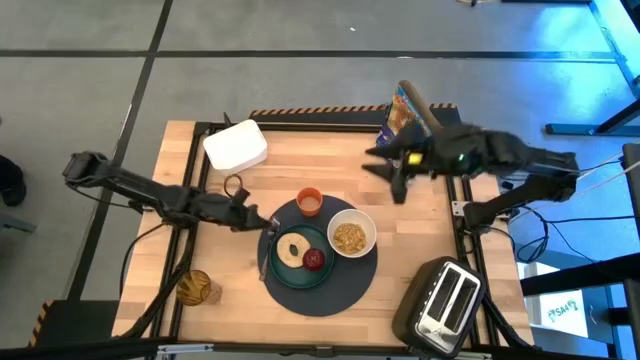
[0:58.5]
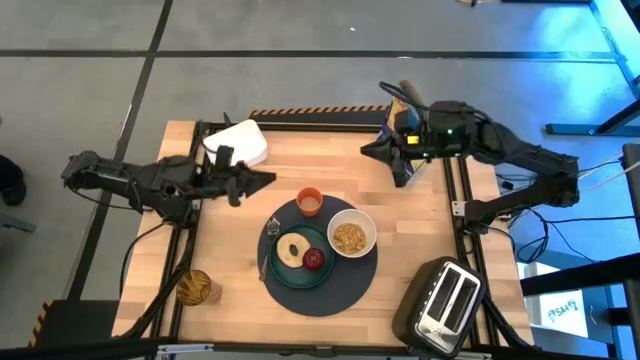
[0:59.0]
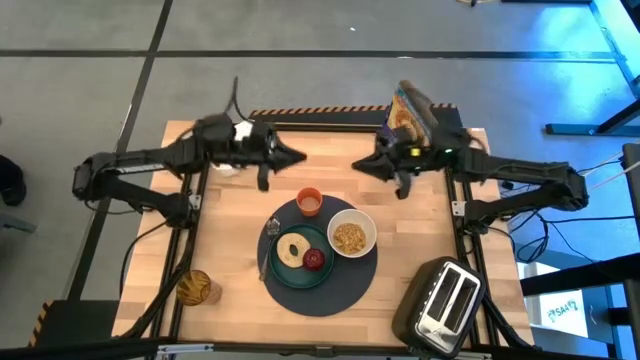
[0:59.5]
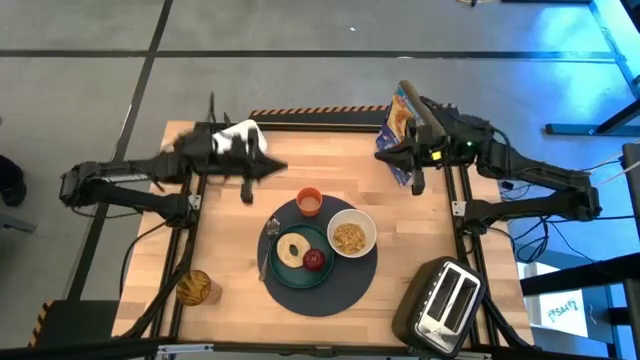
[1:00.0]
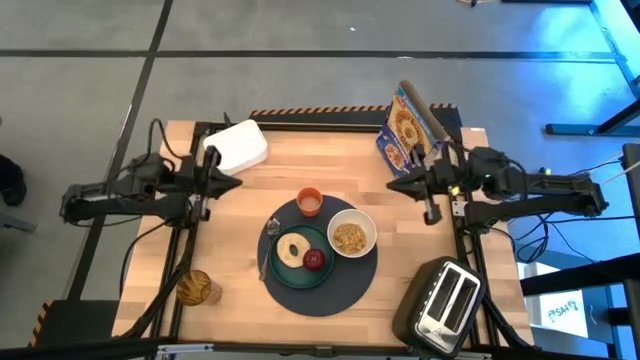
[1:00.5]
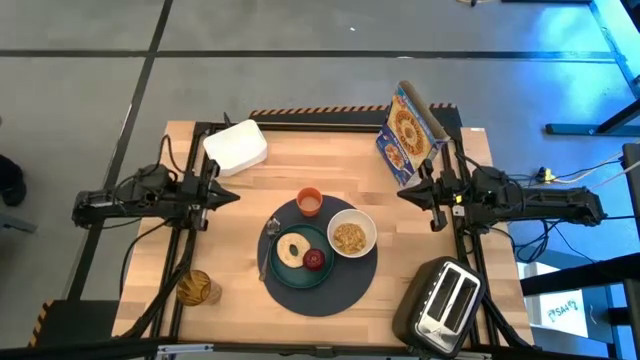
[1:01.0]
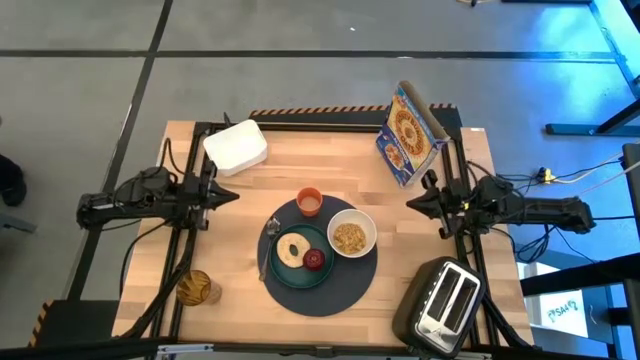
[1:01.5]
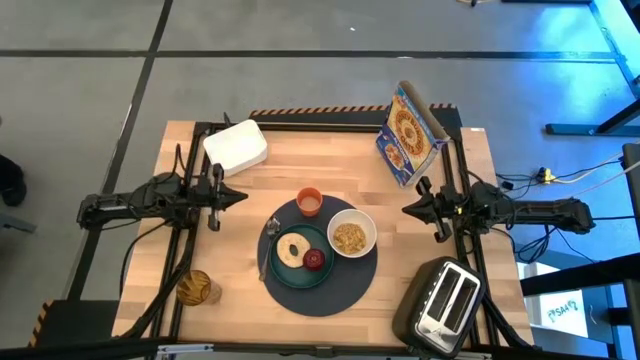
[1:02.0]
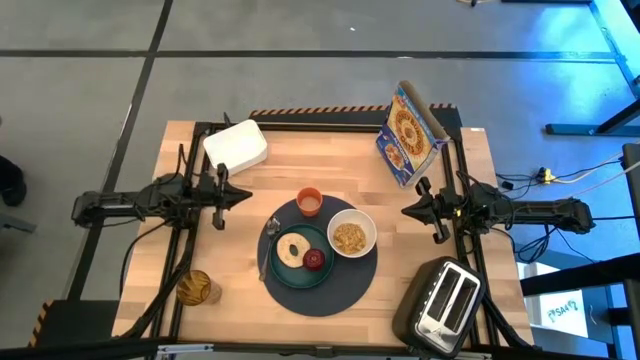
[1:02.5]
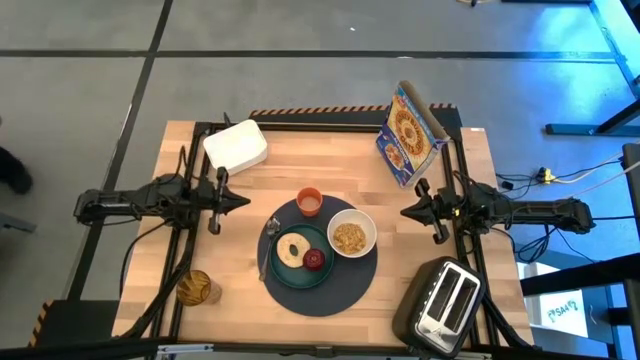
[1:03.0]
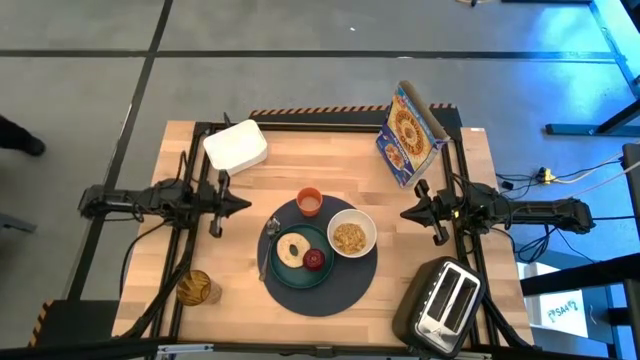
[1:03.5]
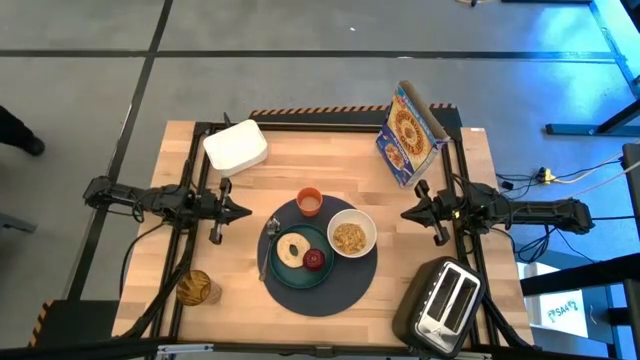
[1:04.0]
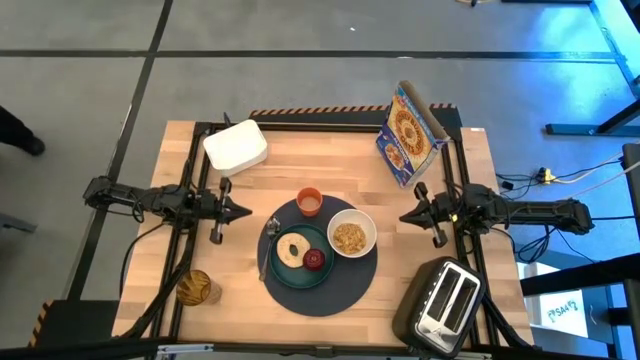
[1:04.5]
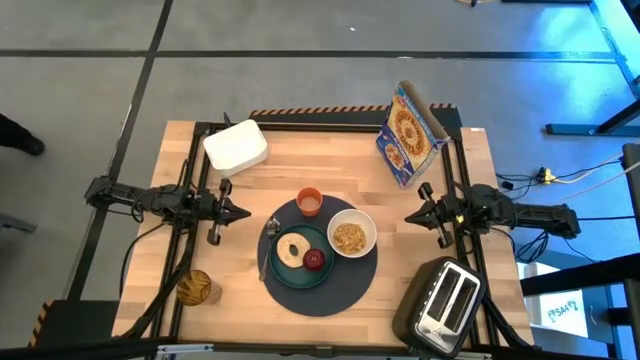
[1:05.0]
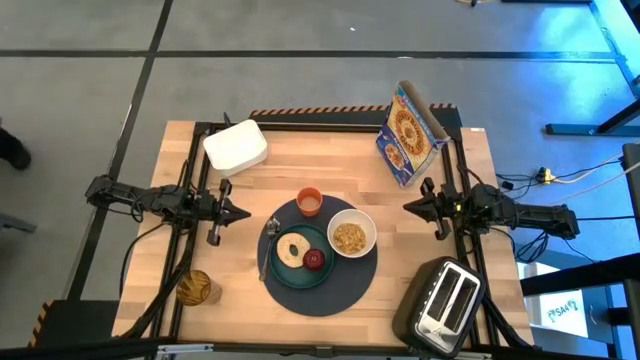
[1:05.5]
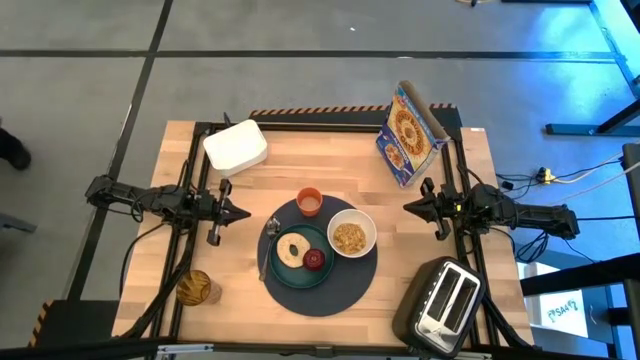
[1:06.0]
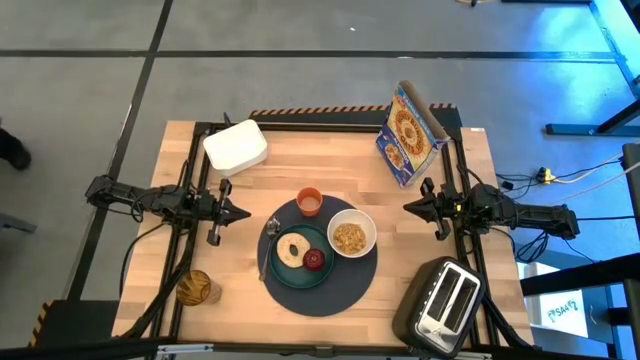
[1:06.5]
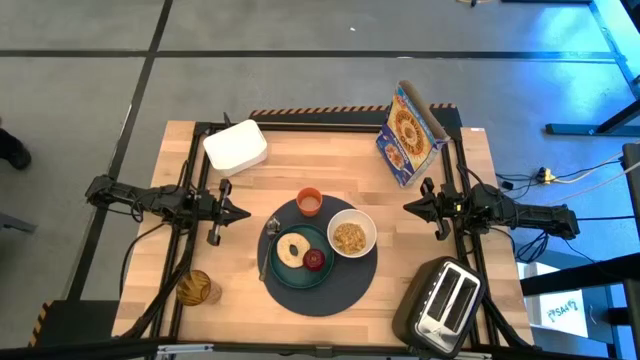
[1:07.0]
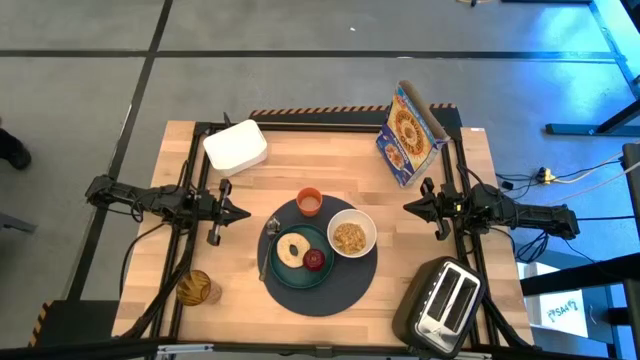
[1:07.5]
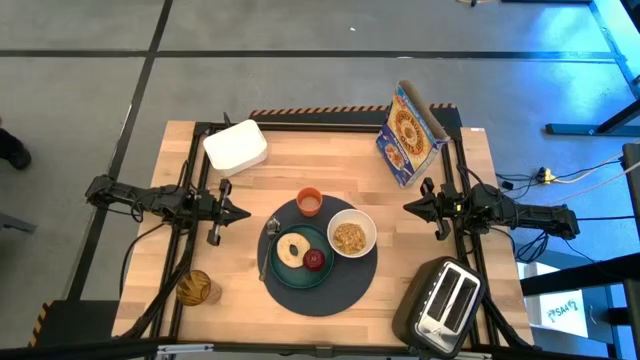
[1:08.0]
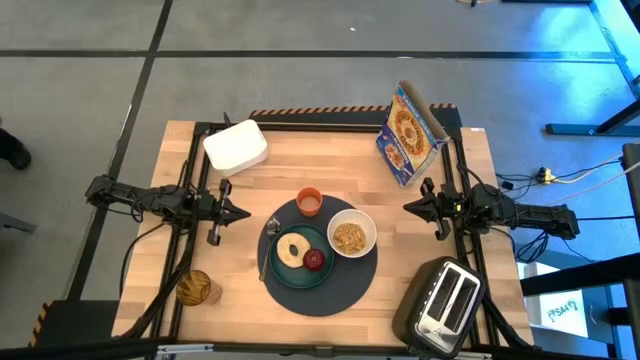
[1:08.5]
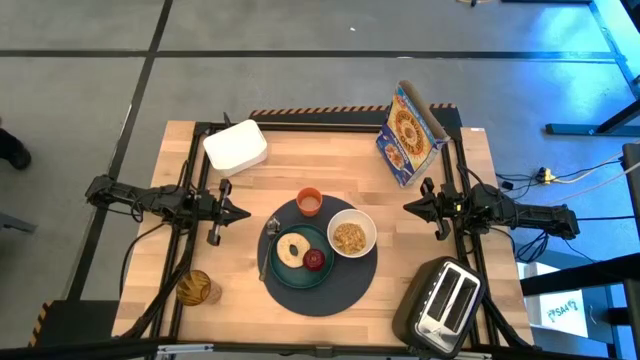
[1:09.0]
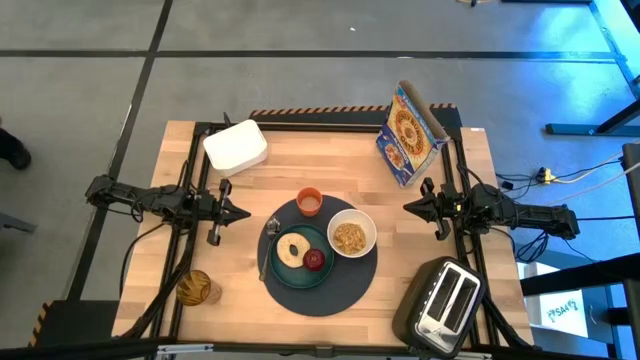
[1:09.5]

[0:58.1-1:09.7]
Task: Arrange a breakfast setting
Return to Home Position

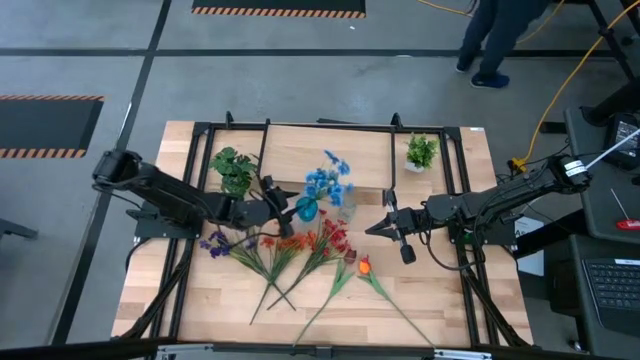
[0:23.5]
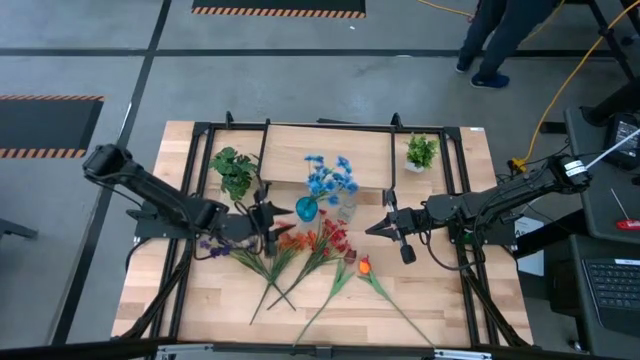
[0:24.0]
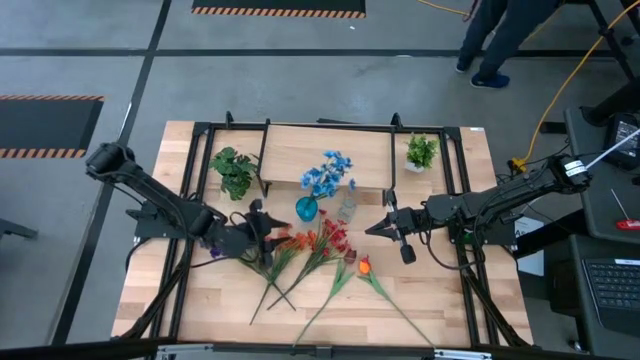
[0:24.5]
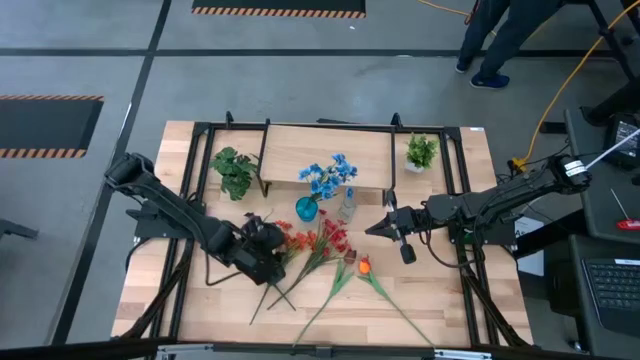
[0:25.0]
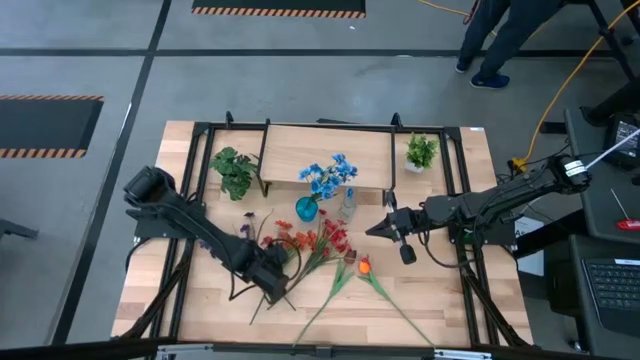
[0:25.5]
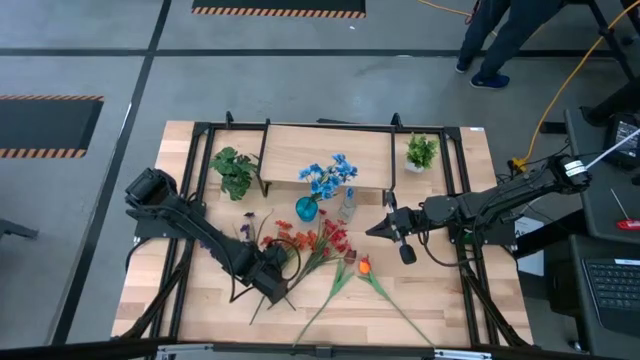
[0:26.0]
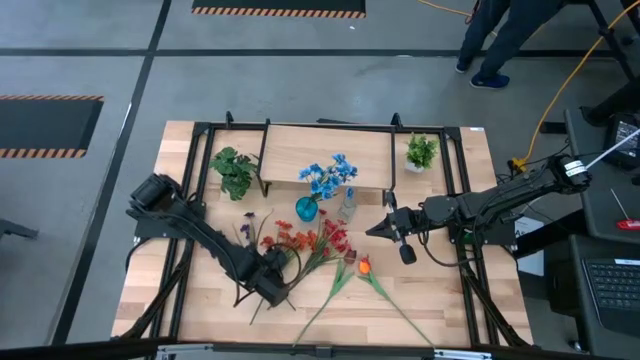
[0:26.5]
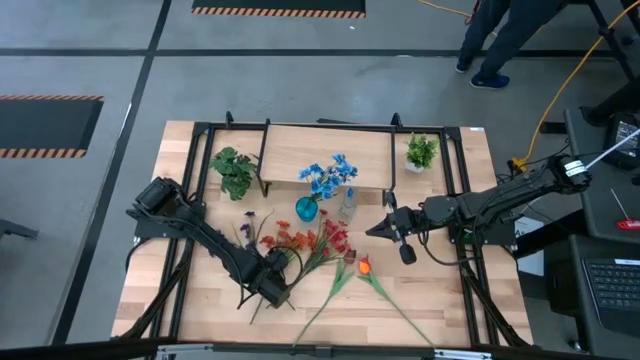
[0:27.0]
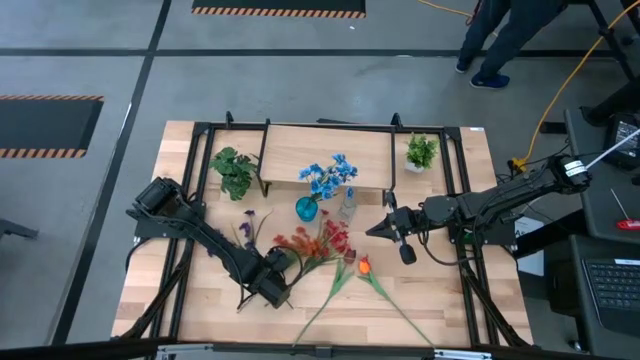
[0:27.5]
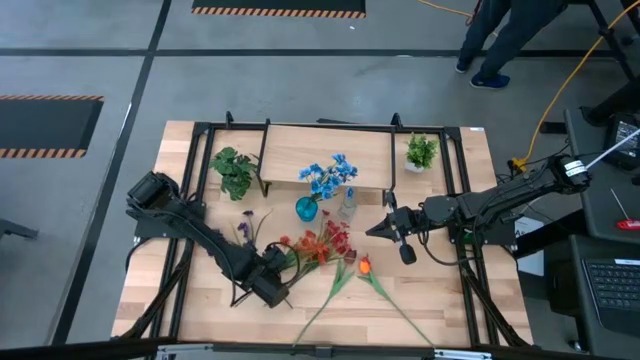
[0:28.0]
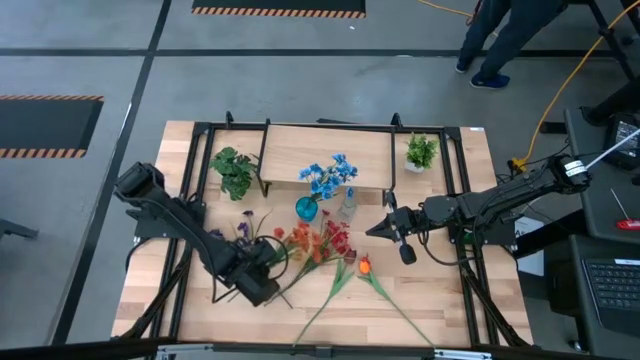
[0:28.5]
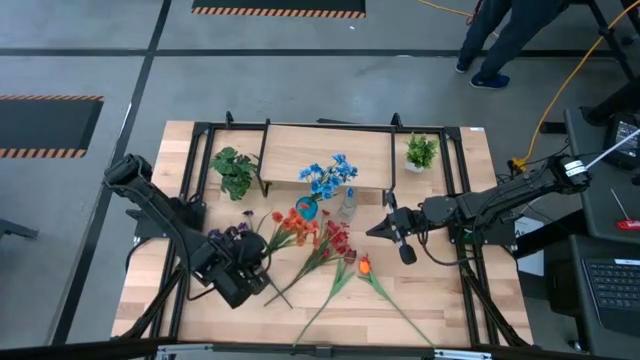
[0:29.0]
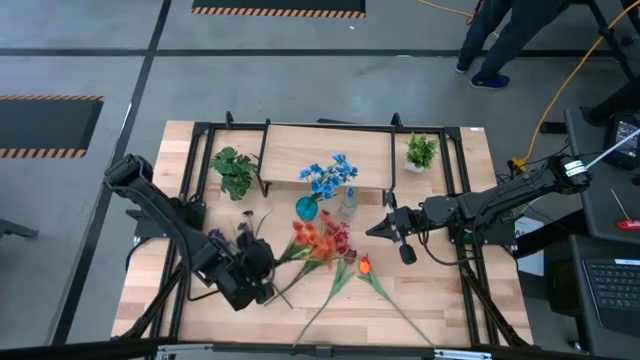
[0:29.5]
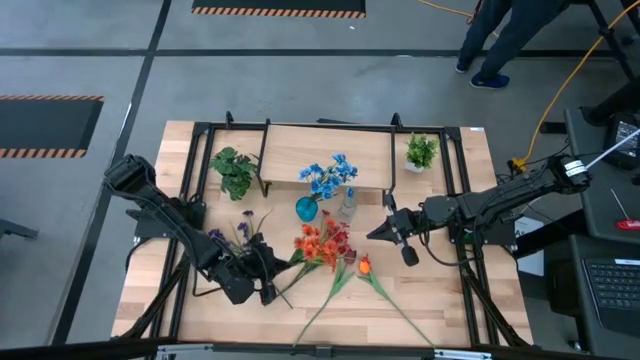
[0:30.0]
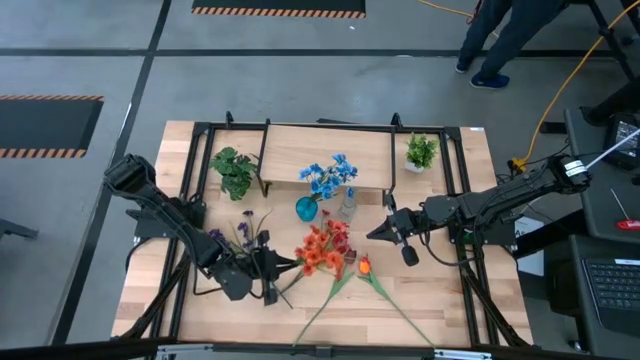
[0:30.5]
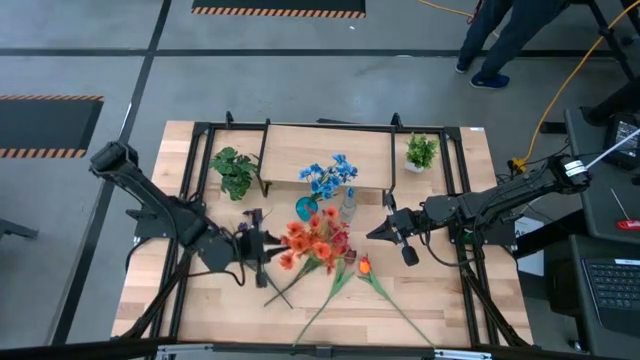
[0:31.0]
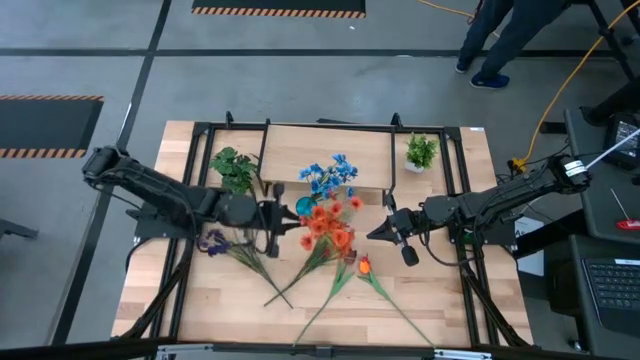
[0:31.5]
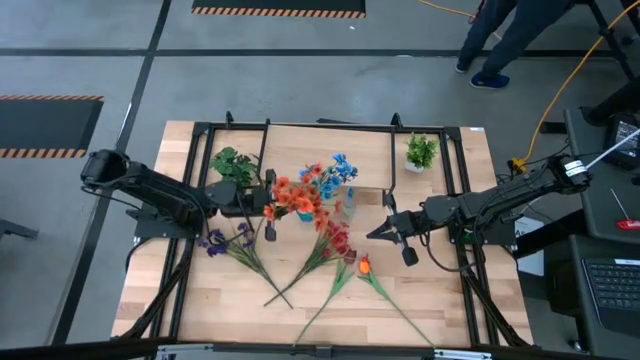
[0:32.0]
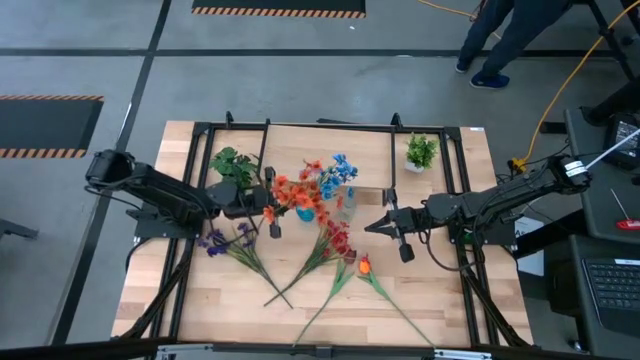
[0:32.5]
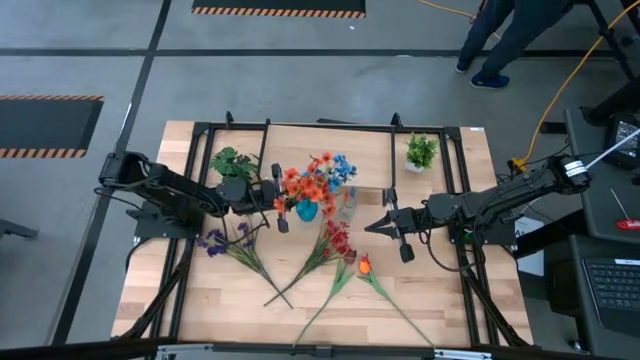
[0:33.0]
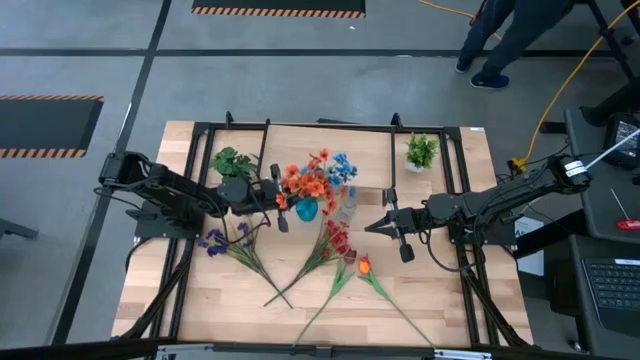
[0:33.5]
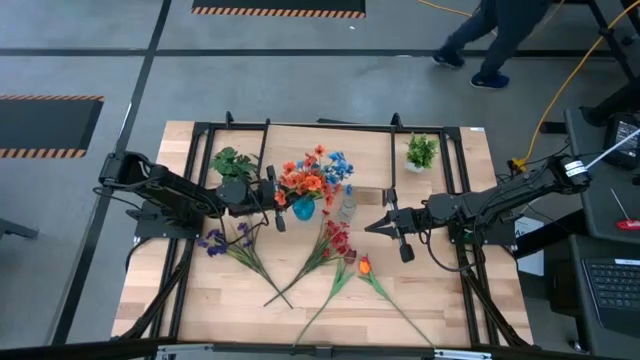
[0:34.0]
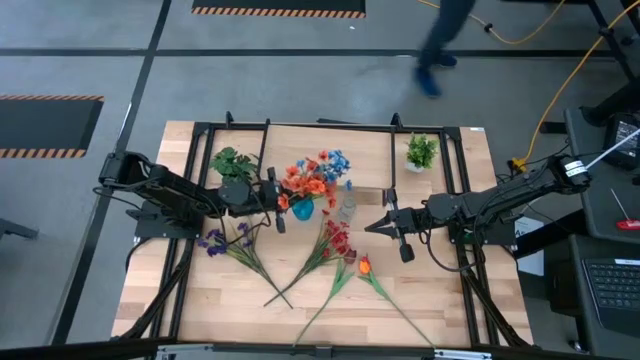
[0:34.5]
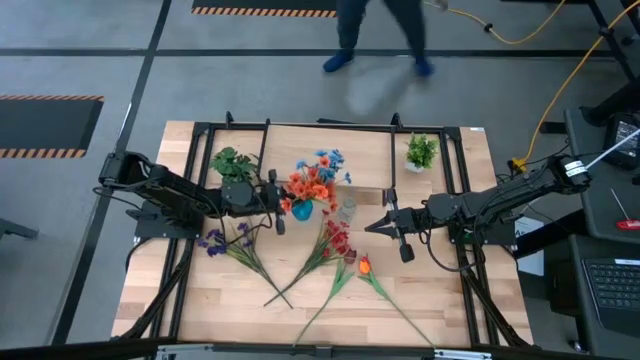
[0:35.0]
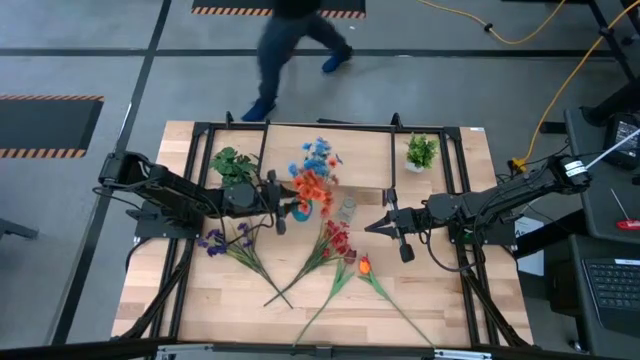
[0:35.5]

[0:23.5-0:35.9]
Task: Pick and place flowers into a vace then onto a shelf
Put the orange flowers into the blue vase
